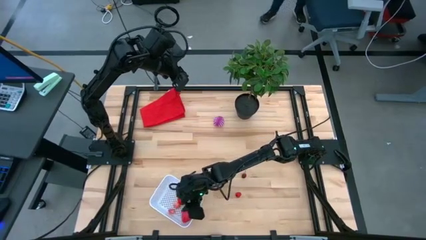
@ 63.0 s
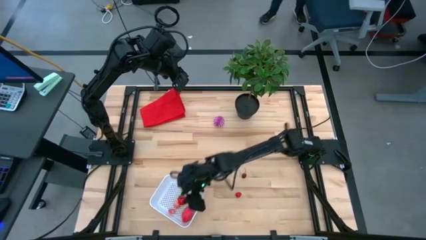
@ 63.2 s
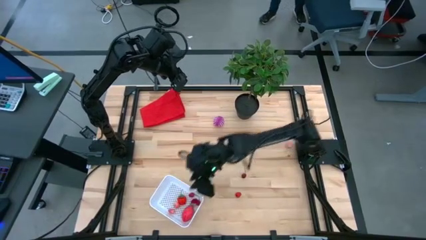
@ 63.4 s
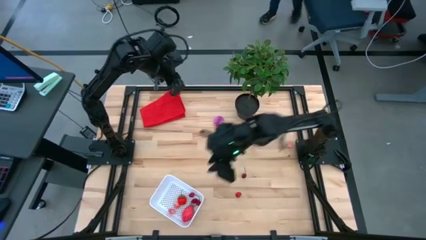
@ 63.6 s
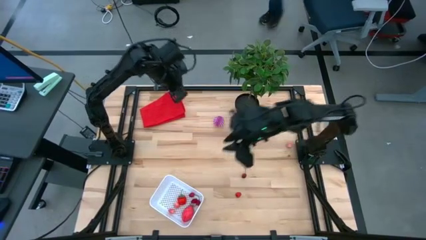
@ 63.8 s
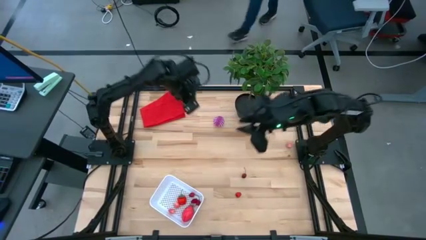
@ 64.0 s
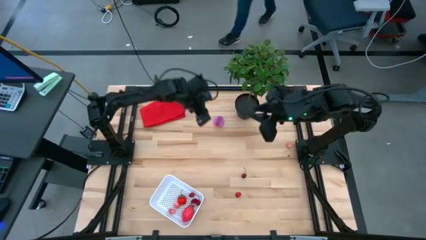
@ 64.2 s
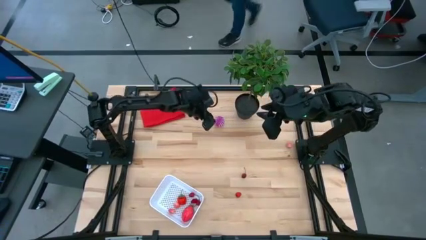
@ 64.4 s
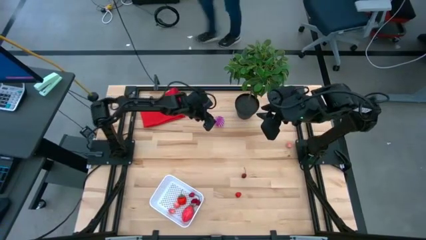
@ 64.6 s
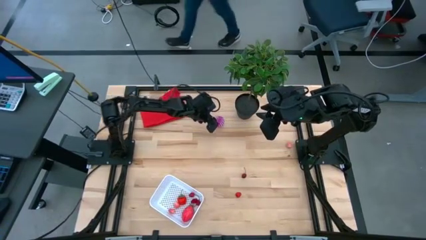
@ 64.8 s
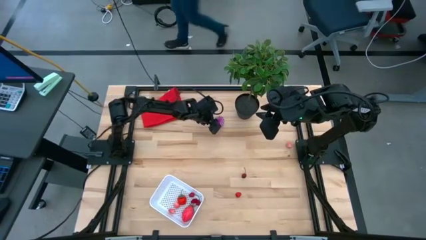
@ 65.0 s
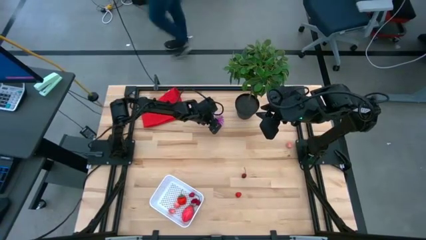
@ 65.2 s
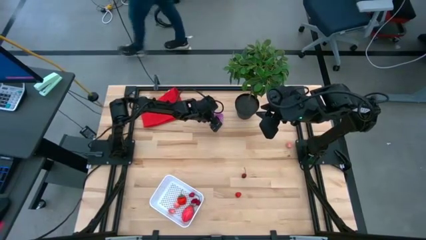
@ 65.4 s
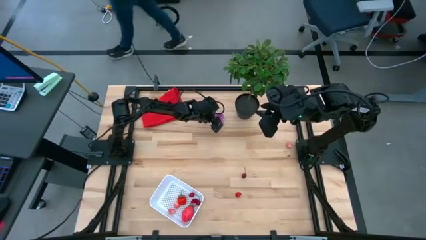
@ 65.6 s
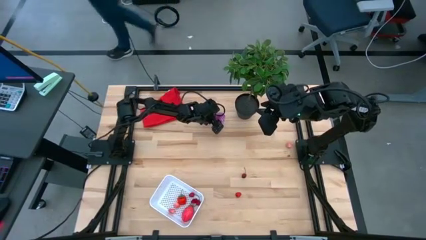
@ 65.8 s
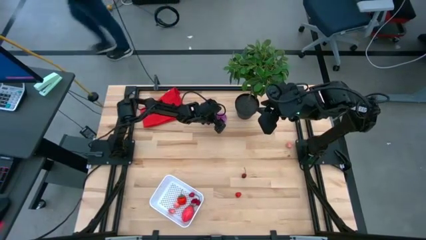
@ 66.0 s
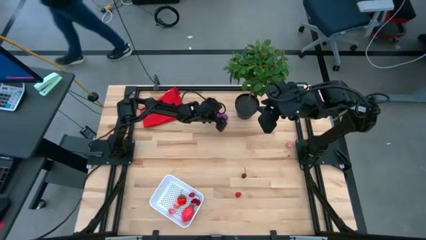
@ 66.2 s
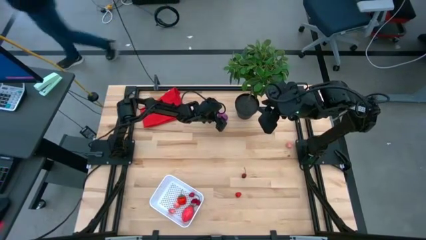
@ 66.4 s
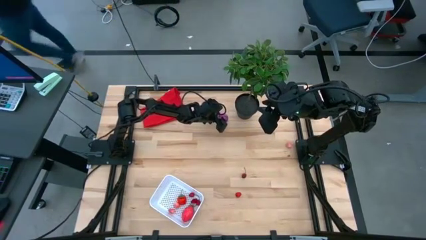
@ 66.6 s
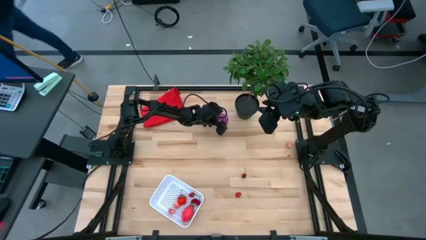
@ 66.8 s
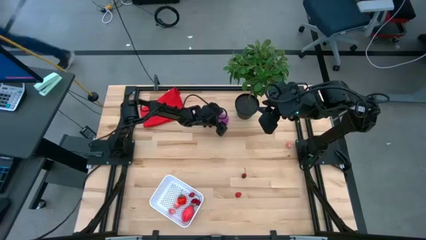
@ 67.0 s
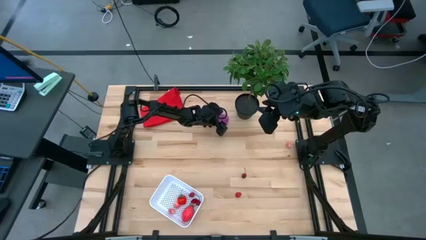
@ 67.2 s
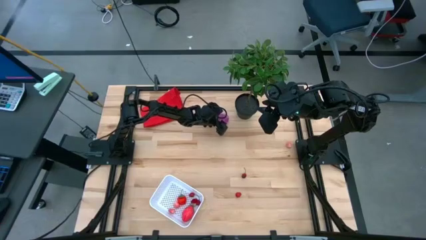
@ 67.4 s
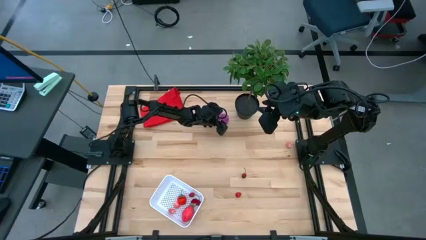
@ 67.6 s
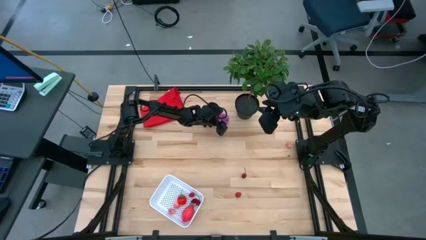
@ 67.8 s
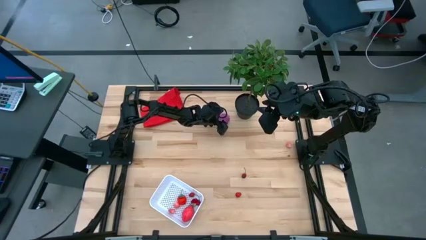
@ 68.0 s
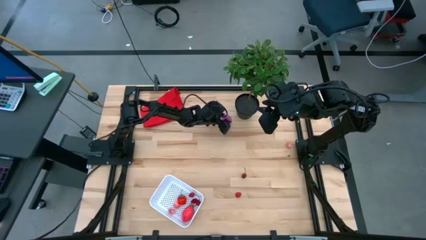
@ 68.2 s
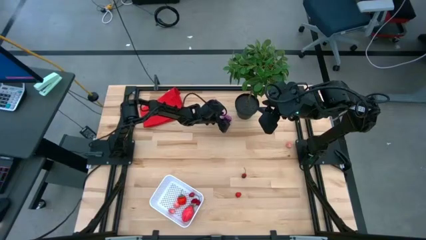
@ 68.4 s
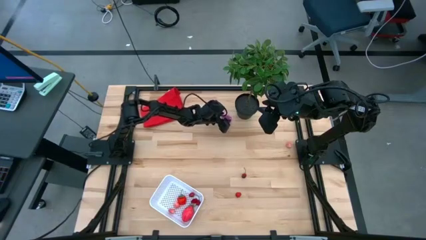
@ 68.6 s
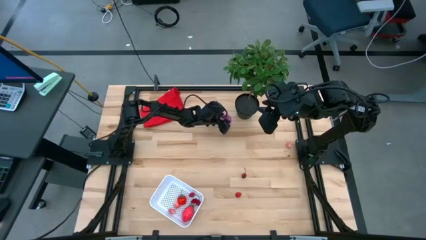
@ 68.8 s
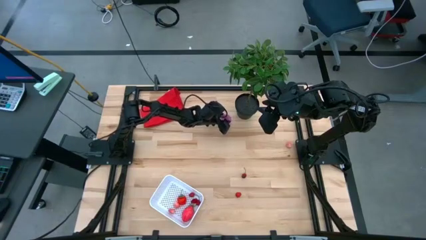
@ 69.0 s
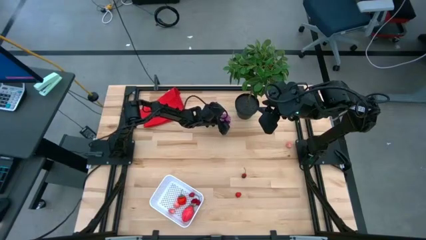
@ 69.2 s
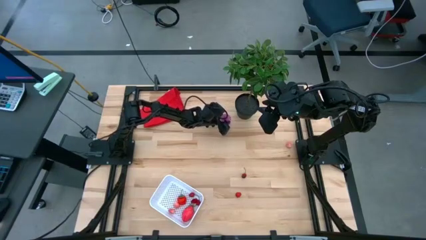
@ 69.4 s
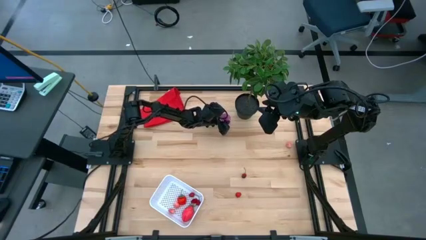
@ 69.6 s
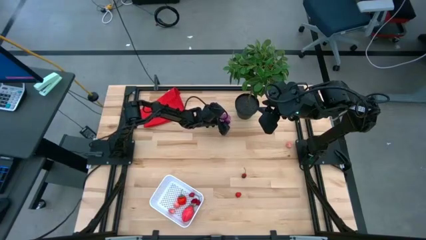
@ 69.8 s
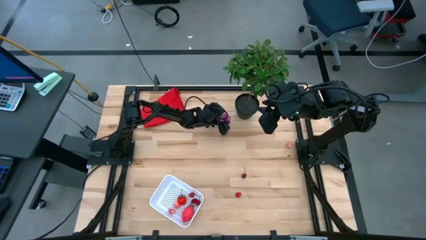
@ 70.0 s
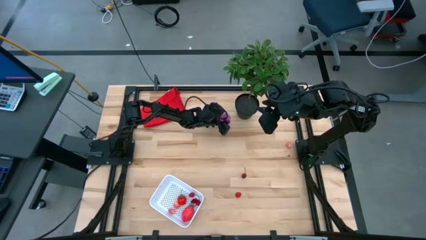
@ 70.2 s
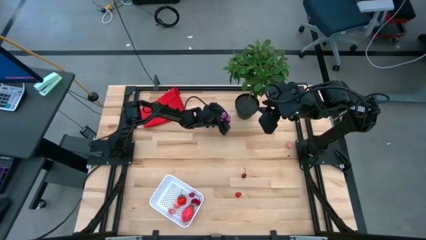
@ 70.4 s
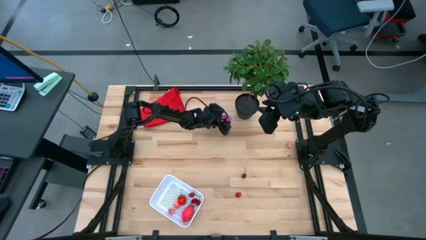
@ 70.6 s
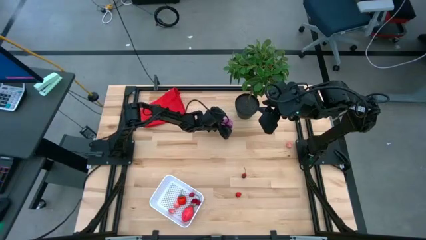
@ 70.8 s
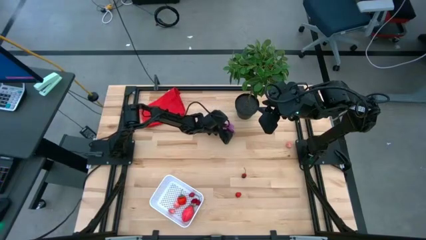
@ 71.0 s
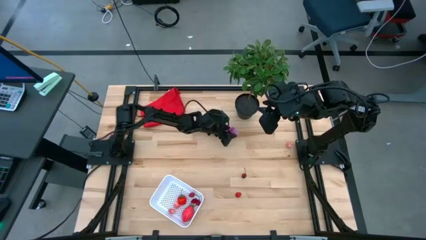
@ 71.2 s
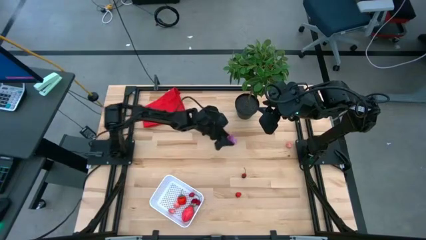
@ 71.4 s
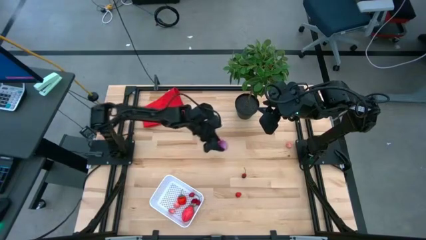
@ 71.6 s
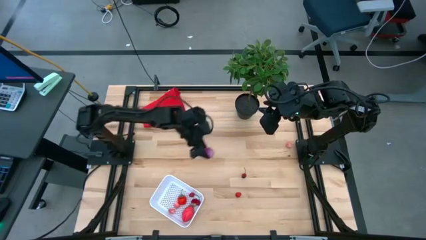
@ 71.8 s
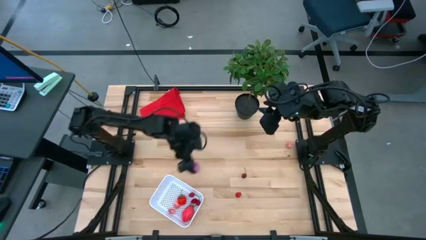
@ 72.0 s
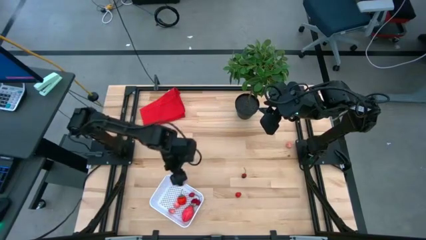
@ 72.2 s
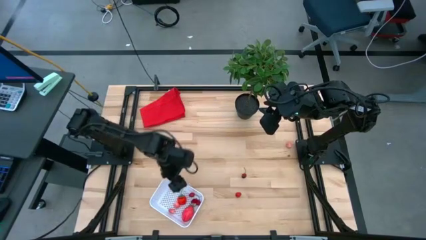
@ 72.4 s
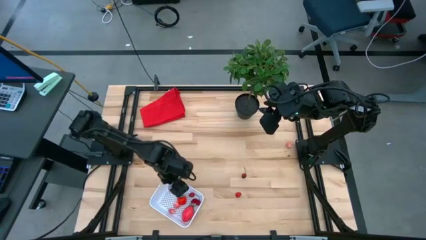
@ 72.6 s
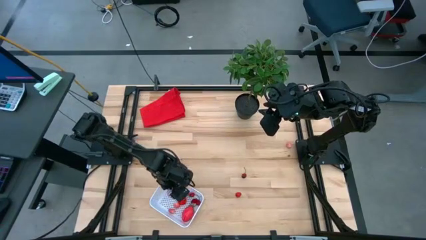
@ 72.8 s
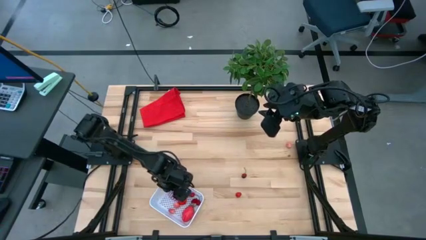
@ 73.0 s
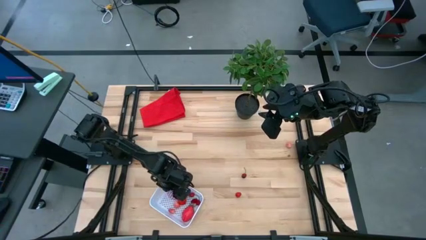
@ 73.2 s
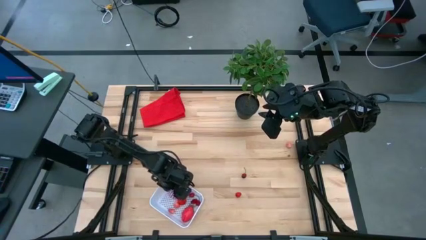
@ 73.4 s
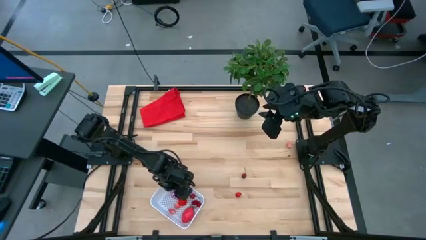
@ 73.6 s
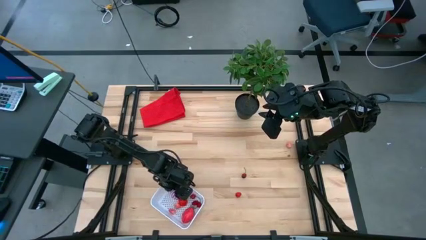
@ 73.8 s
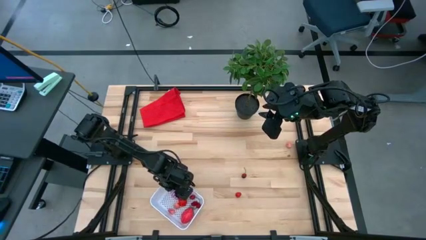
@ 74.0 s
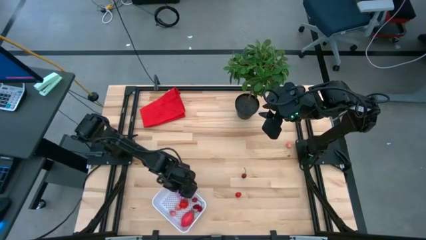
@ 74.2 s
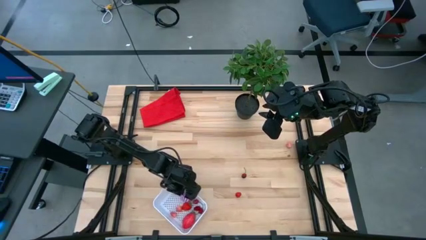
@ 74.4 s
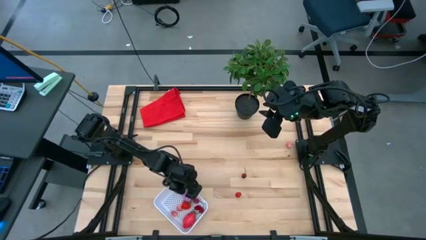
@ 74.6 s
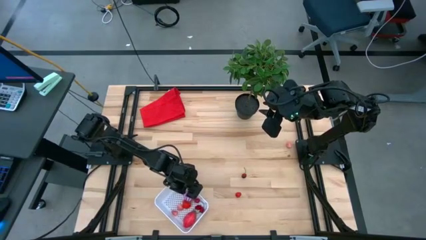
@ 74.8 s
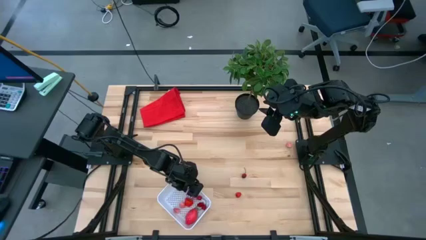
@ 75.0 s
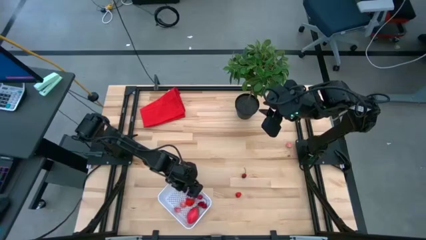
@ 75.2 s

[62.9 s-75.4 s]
Task: Pick and placing Produce into tupperware
Put the onion in the basket

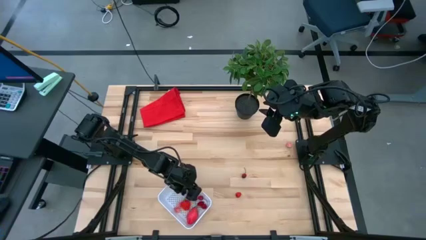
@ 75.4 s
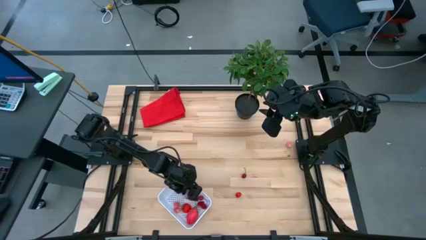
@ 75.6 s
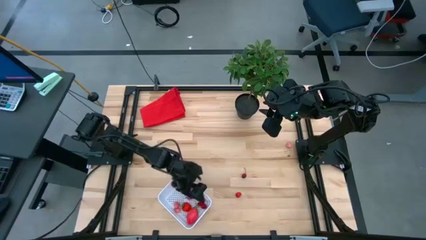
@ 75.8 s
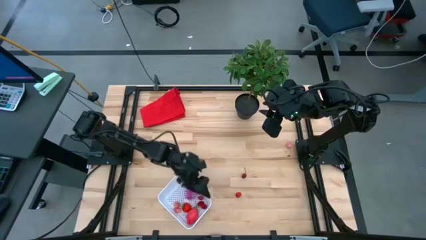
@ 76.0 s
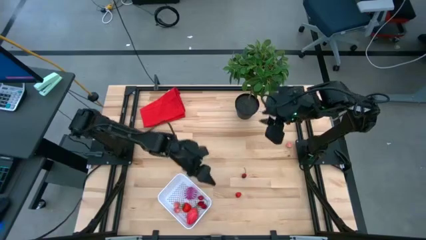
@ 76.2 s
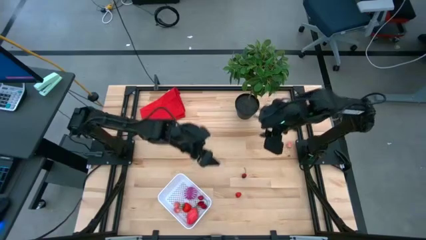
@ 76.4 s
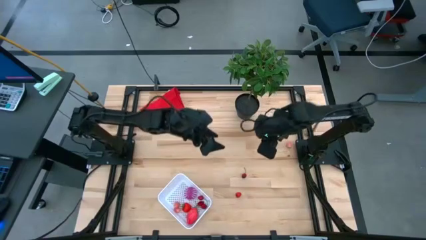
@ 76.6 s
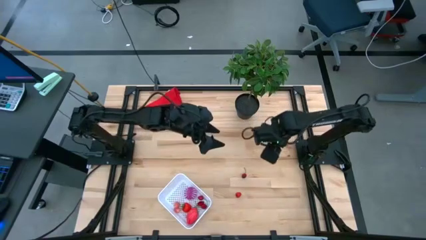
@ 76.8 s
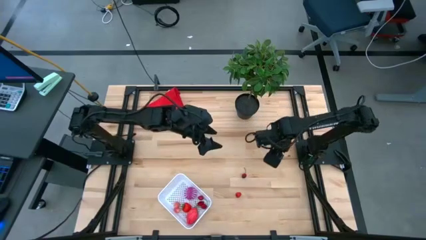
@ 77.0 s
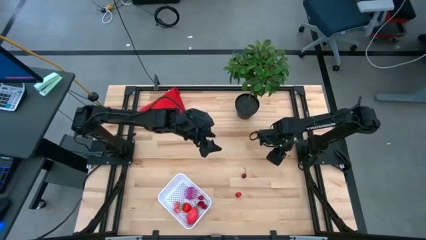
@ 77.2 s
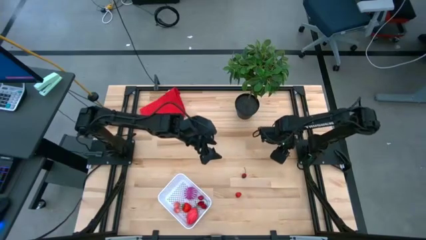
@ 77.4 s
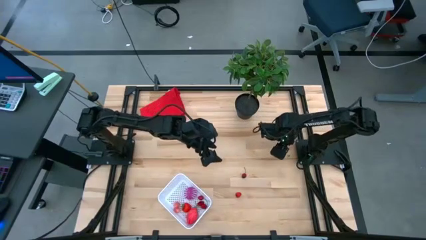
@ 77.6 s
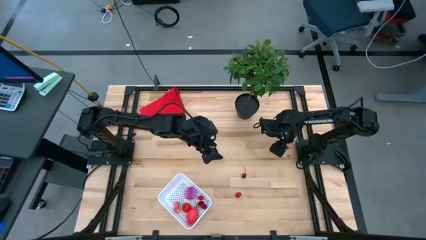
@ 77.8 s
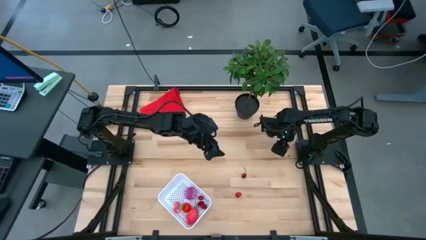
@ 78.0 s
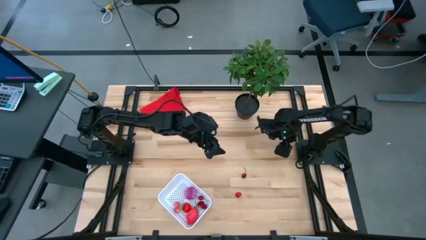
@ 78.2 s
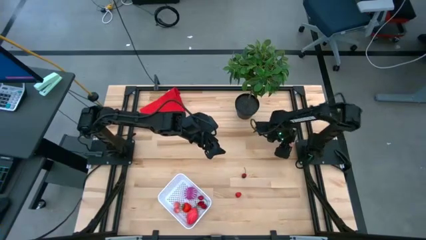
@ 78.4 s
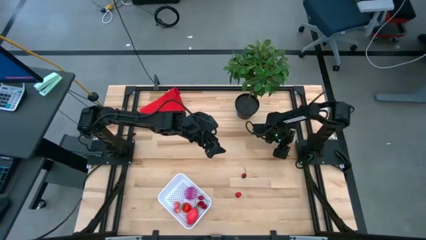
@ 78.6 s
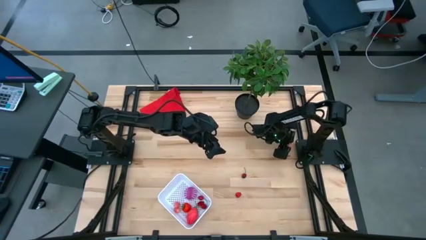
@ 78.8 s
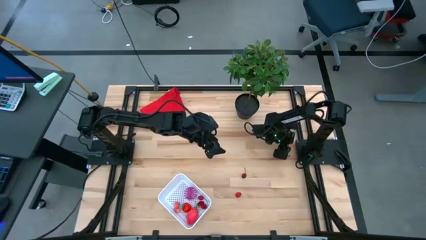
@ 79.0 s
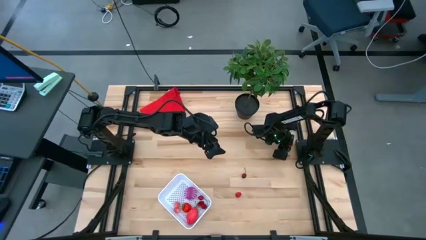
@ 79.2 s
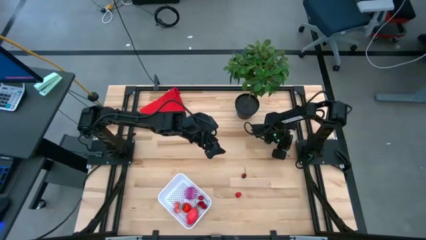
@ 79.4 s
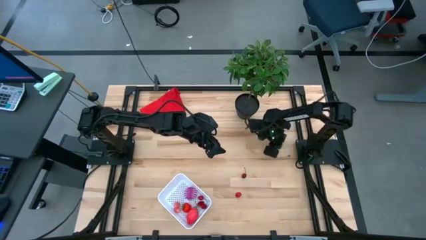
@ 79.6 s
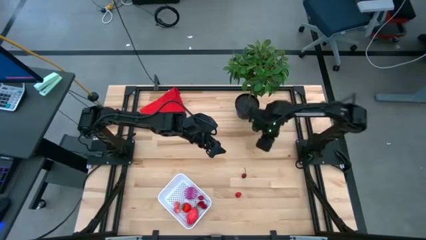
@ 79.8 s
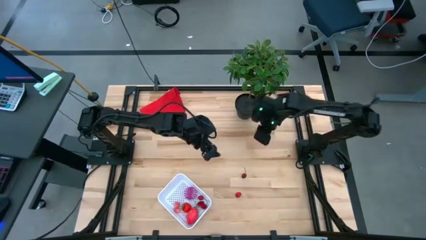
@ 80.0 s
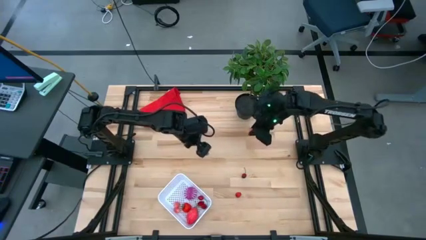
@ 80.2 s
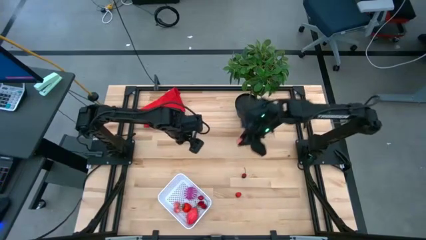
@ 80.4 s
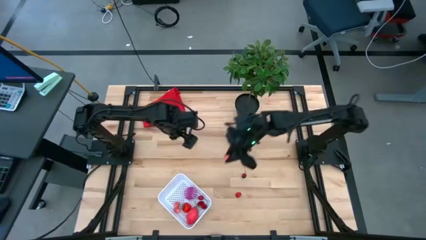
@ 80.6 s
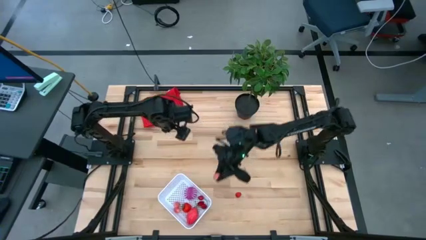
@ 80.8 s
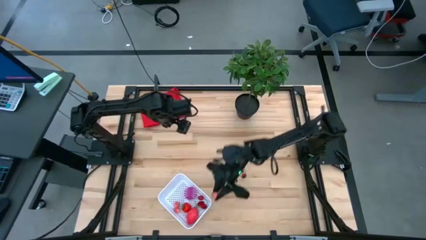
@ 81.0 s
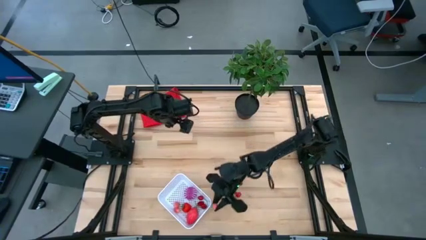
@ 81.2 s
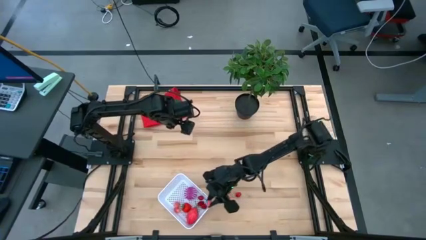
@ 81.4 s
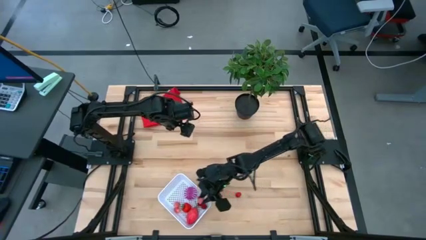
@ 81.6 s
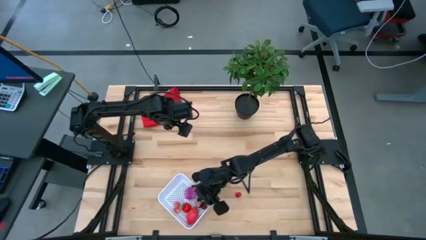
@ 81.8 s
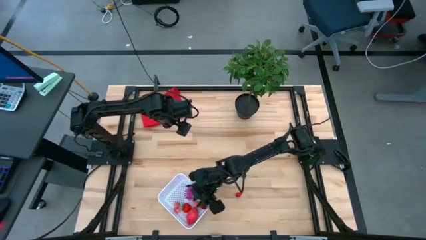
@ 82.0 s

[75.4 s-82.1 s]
Put the peach in the basket
